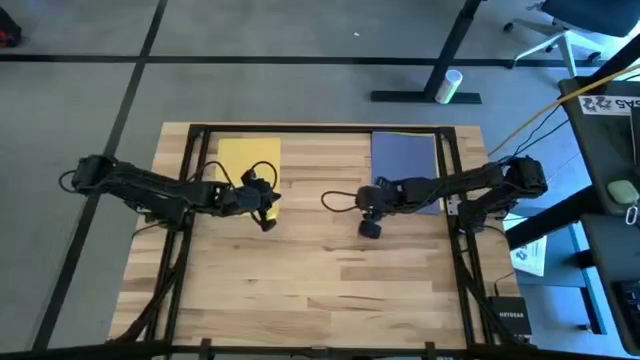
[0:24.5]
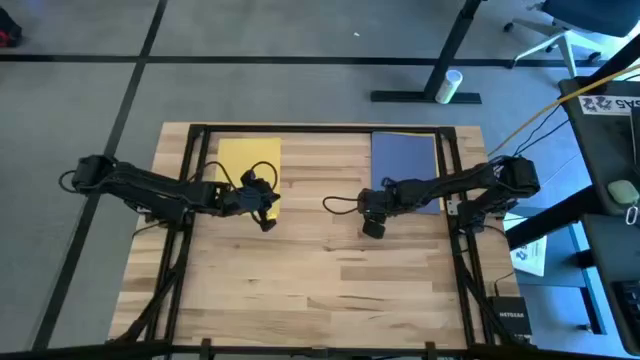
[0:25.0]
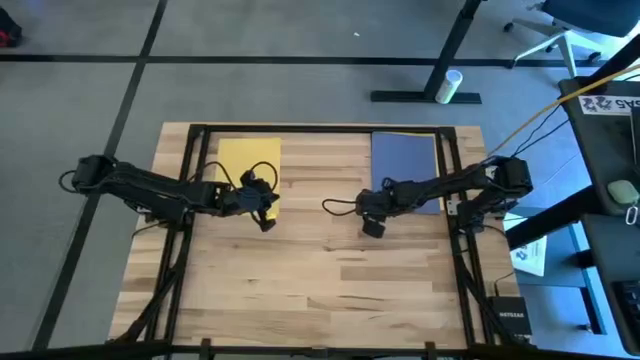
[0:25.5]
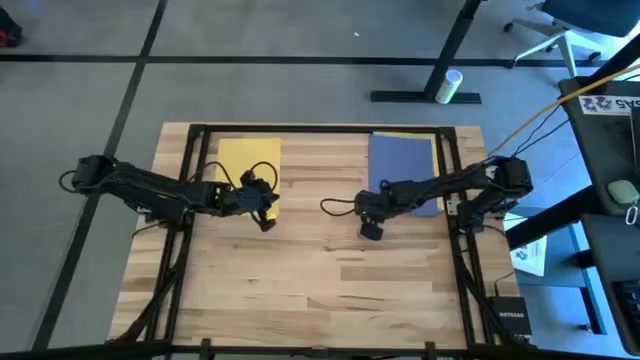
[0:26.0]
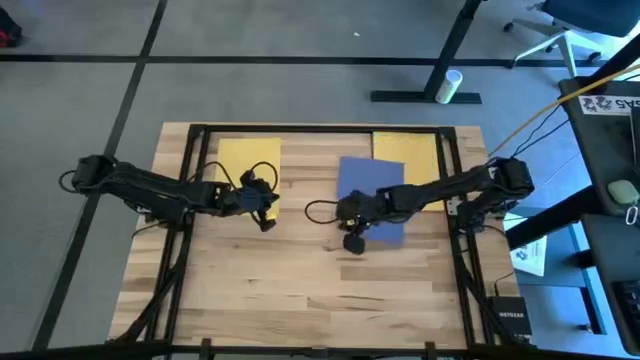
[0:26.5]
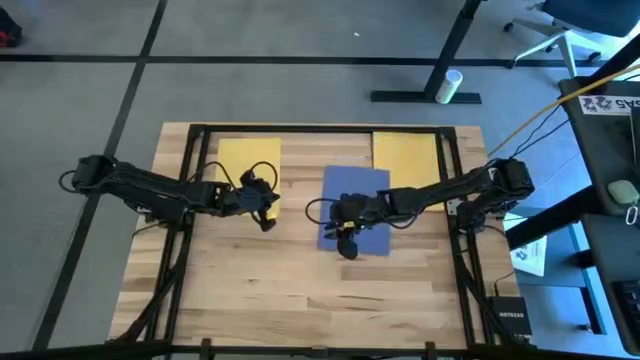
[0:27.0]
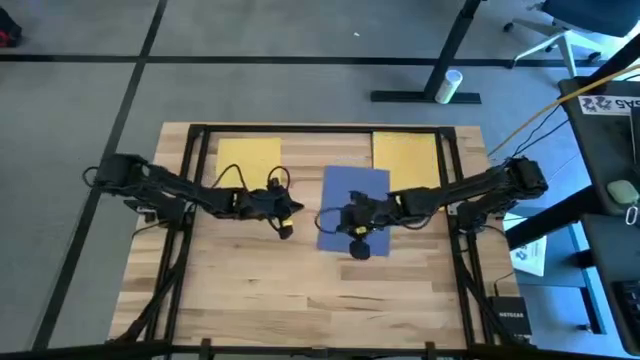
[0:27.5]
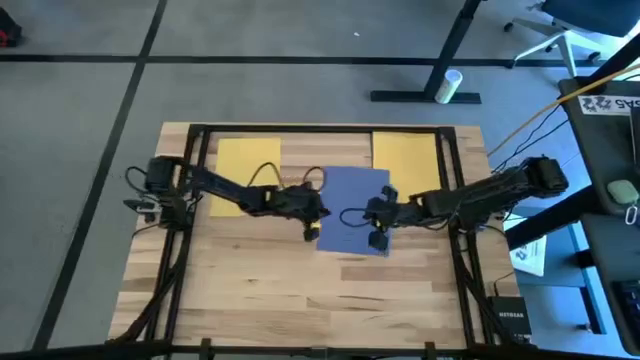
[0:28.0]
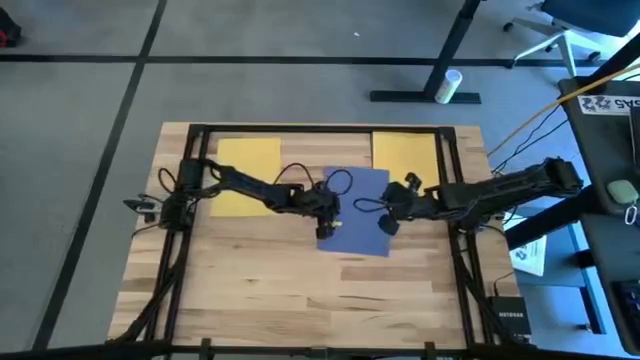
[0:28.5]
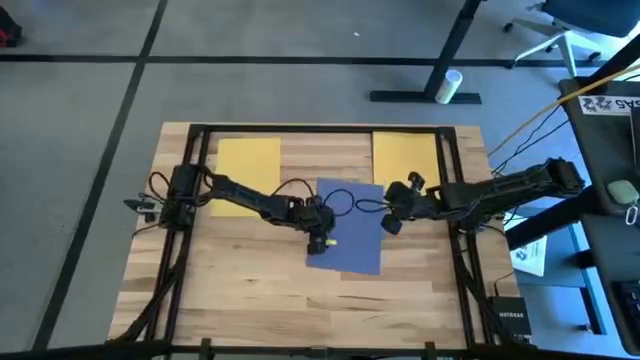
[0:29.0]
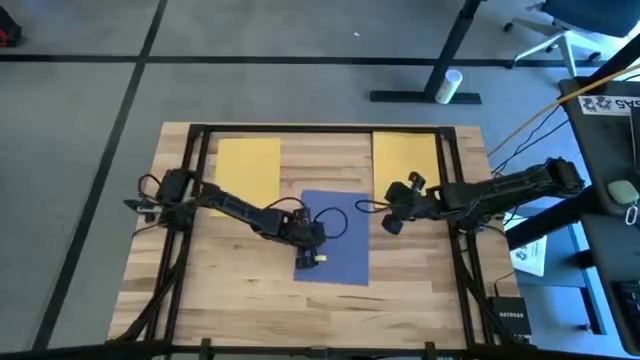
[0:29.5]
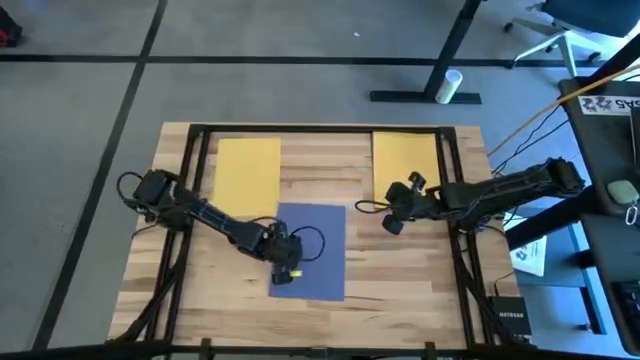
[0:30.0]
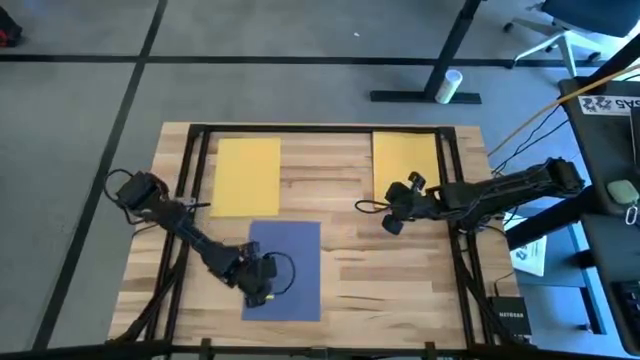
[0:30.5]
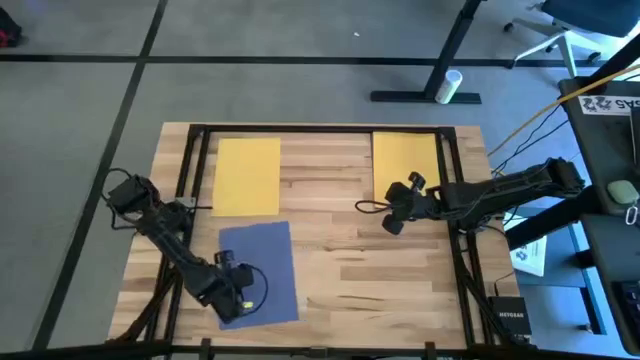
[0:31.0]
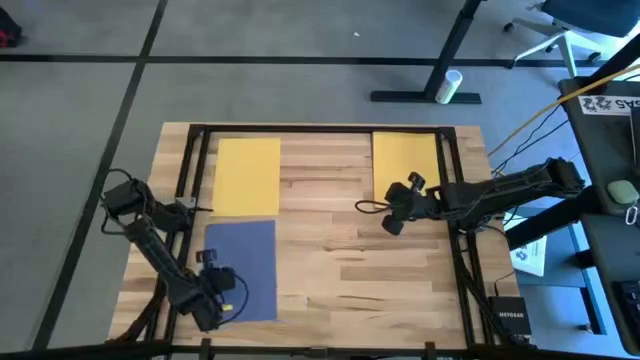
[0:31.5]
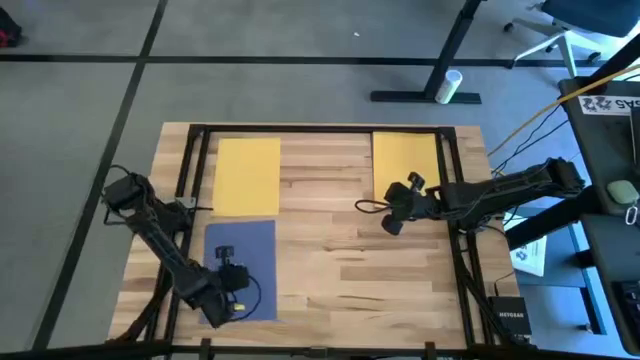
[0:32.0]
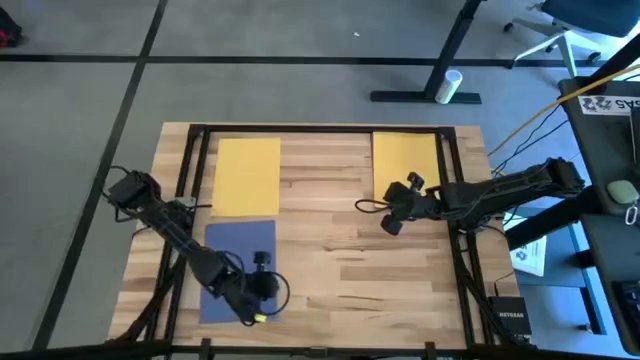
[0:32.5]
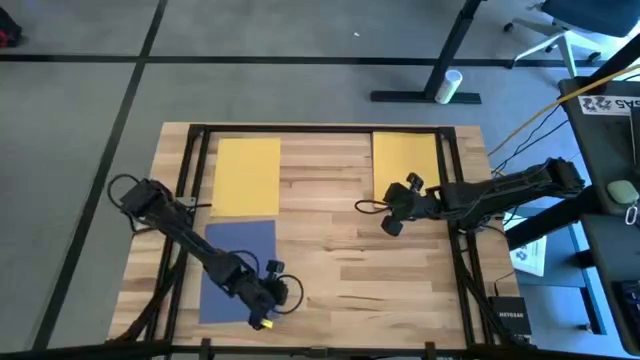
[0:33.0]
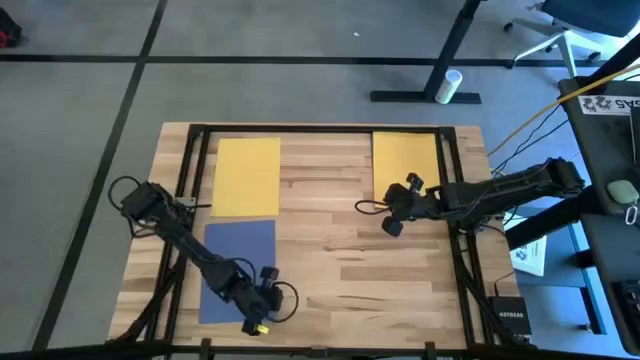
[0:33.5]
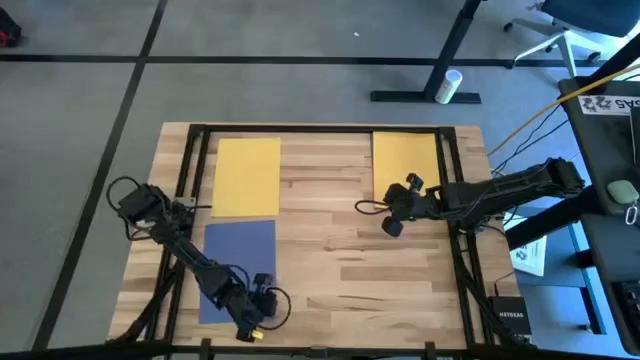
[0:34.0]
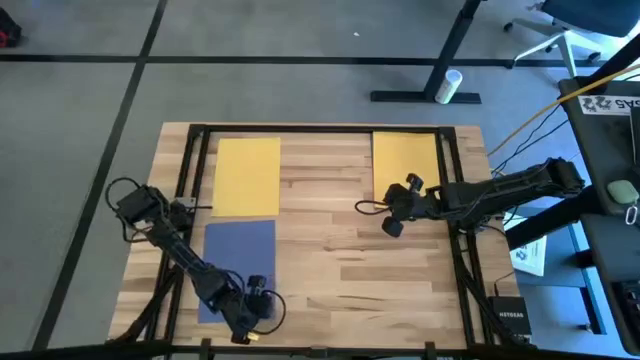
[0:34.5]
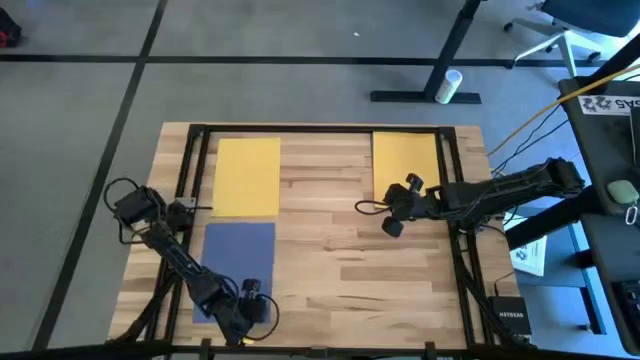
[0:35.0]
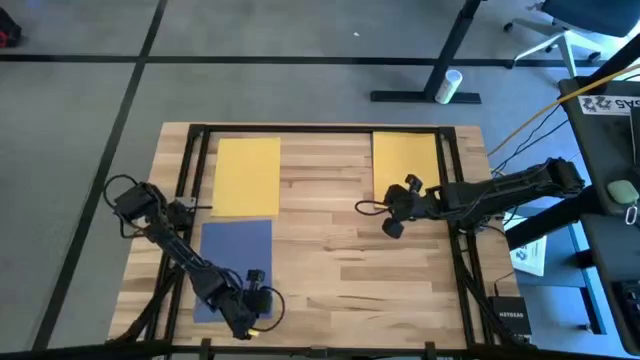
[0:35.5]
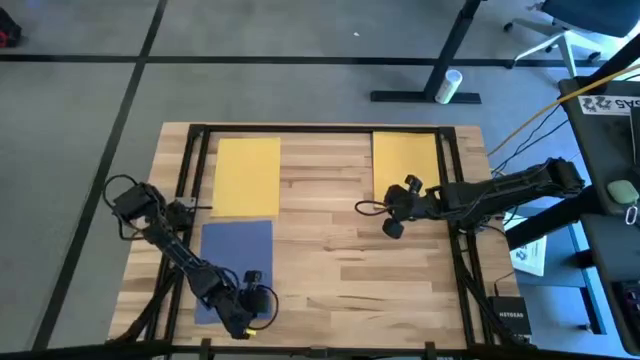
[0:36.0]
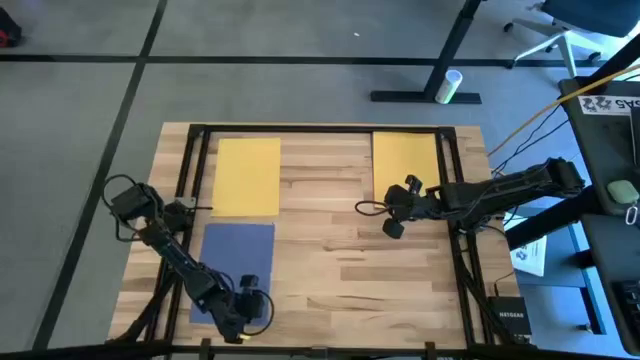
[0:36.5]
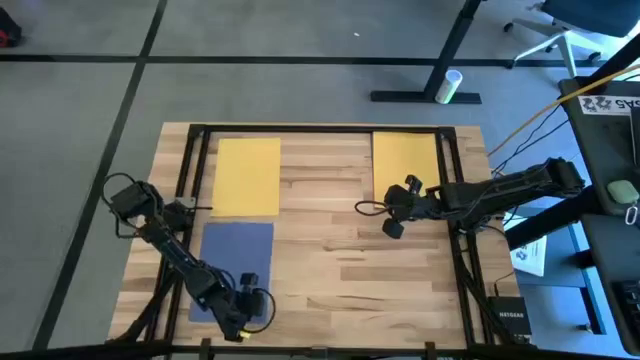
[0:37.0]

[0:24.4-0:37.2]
Task: Organize paper
Move the violet paper to the bottom left of the table
